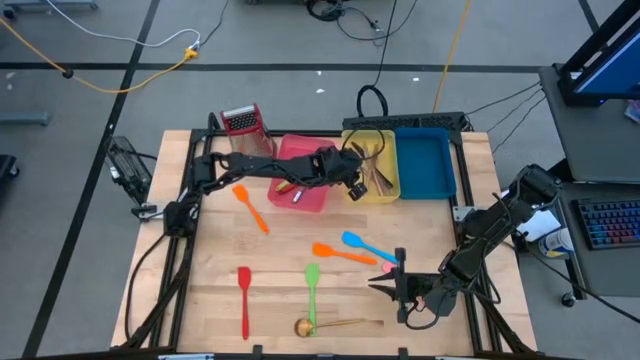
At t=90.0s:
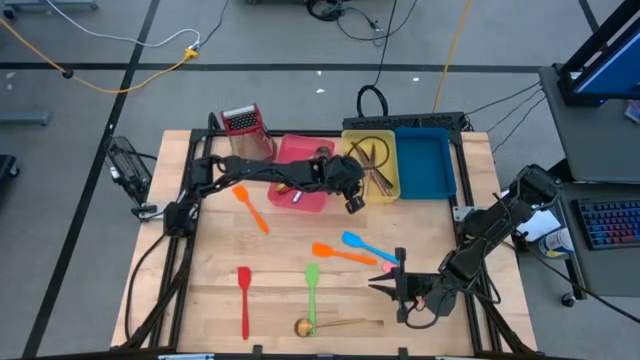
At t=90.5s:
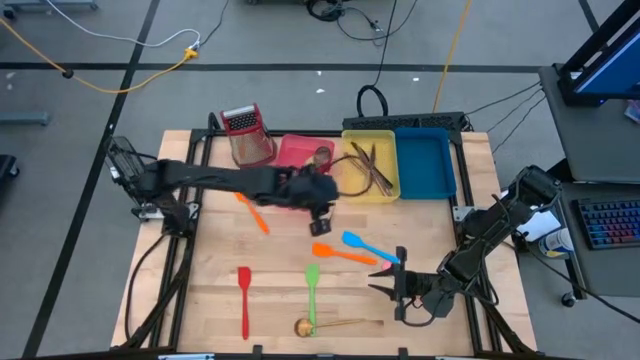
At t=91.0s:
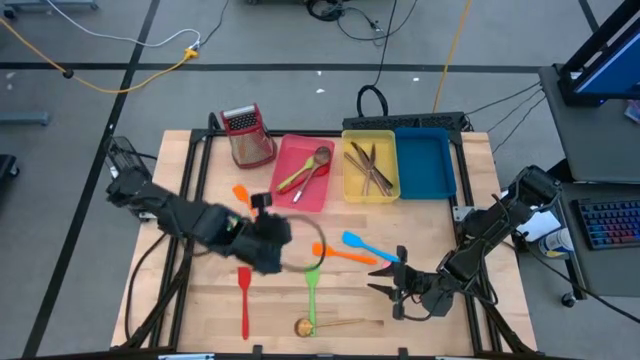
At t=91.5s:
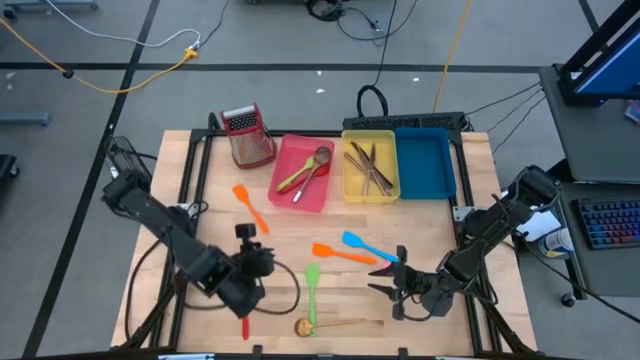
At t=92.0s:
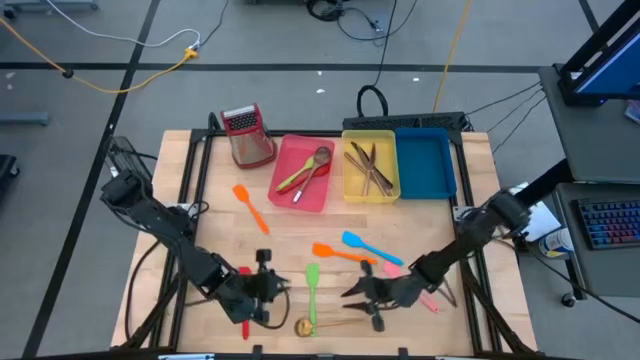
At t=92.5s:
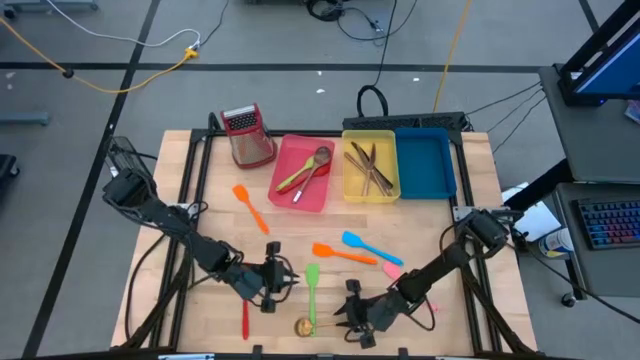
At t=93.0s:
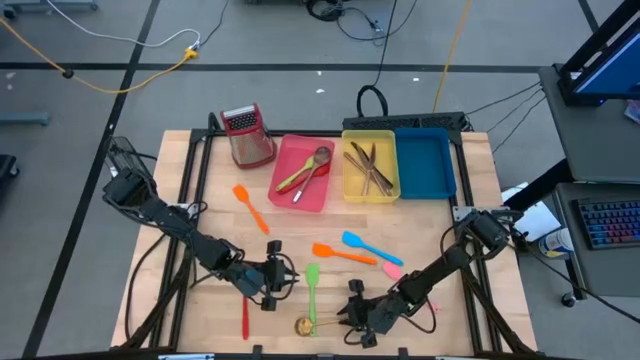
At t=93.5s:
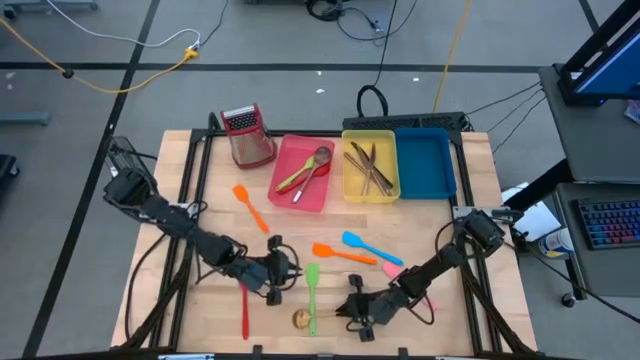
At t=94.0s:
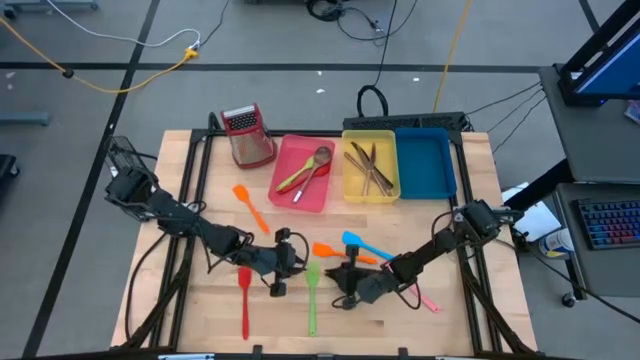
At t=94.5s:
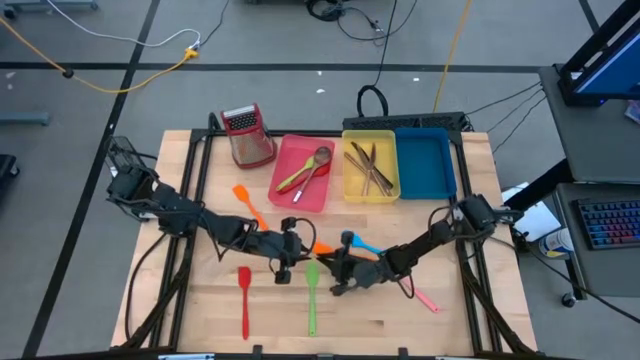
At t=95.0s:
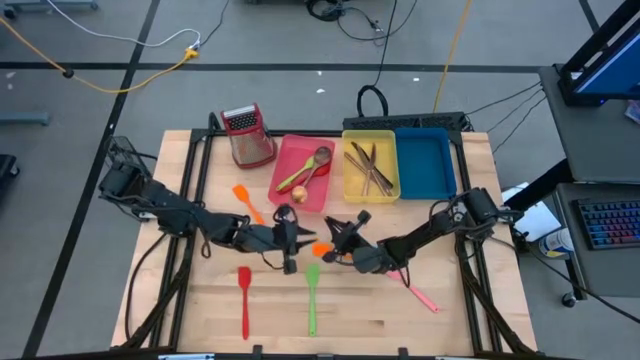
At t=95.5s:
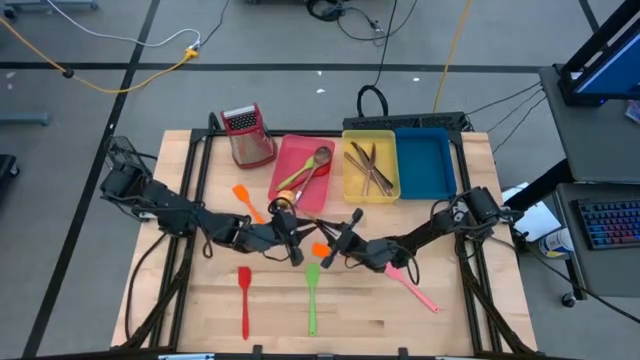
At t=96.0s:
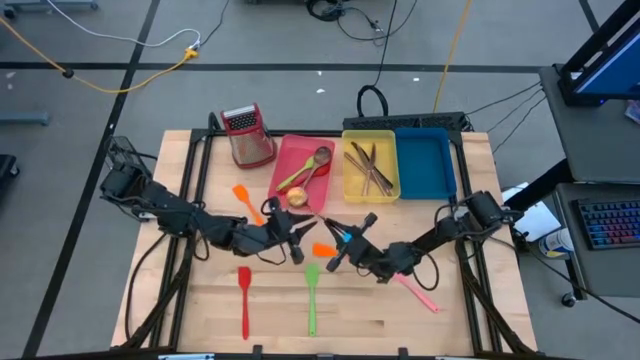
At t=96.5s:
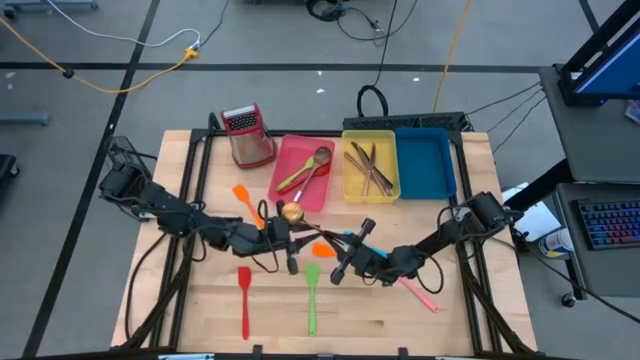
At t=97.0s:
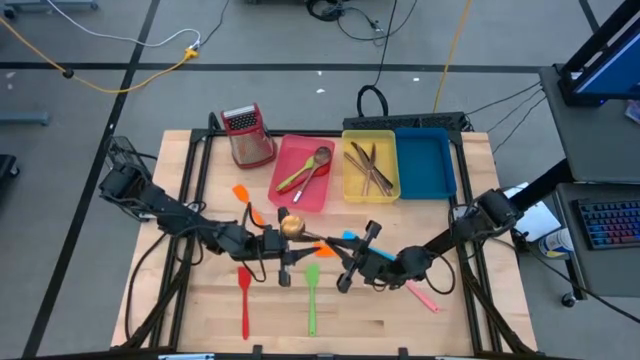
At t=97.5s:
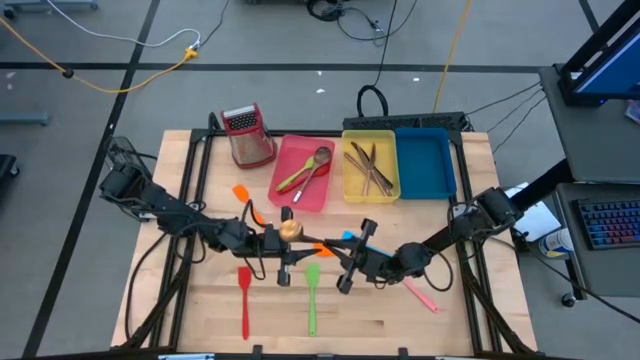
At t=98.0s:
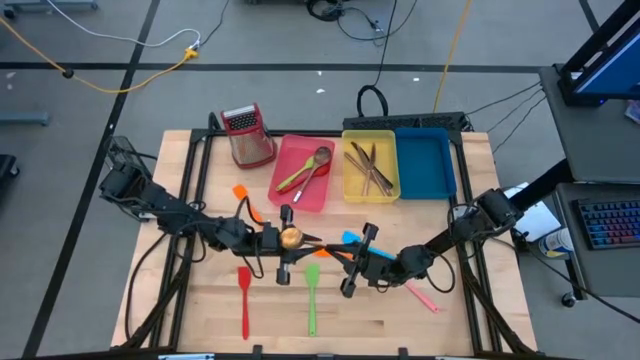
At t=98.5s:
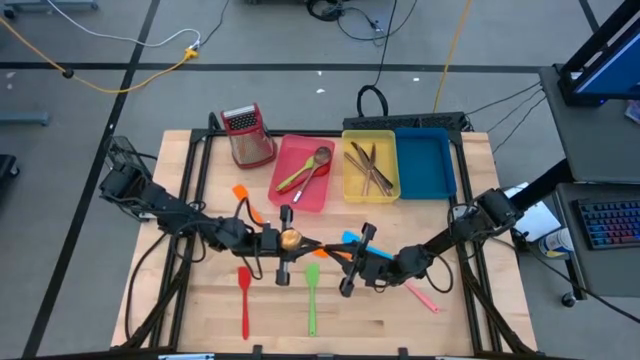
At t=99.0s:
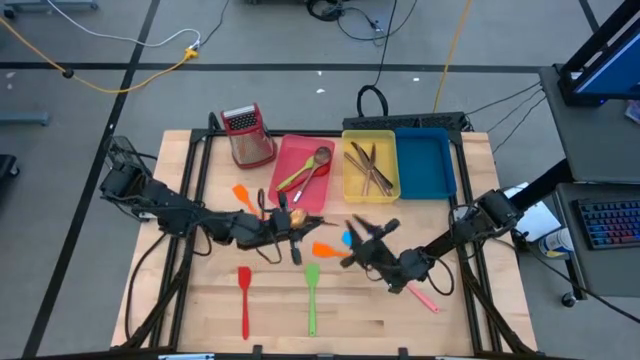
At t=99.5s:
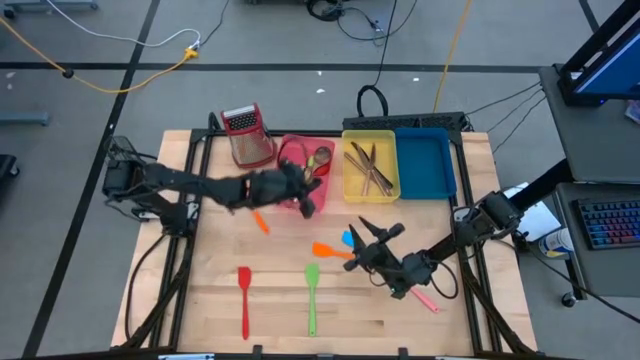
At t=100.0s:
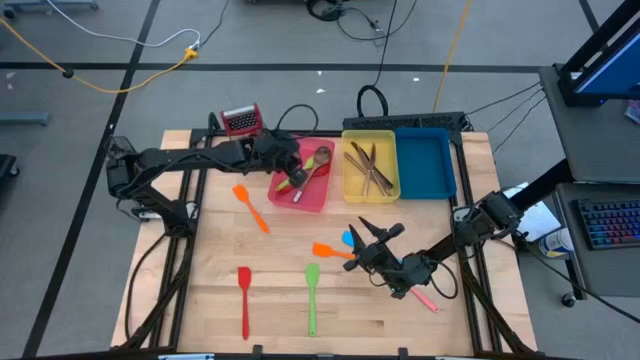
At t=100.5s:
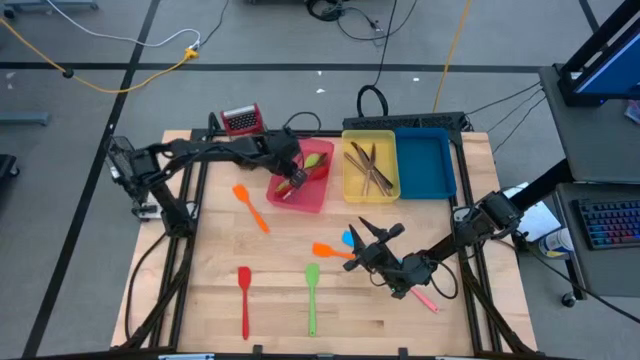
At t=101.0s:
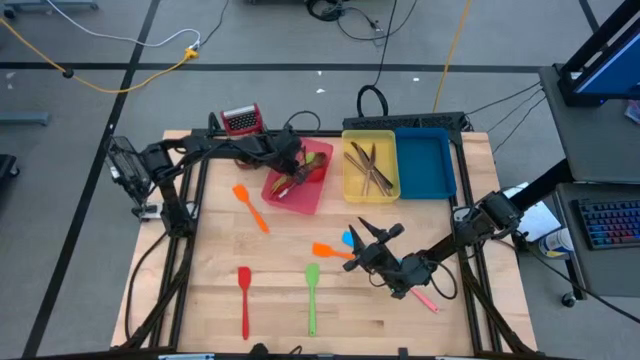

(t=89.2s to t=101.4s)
Task: Pick & Place Kitchen Items
Put the gold serving spoon into the red bin

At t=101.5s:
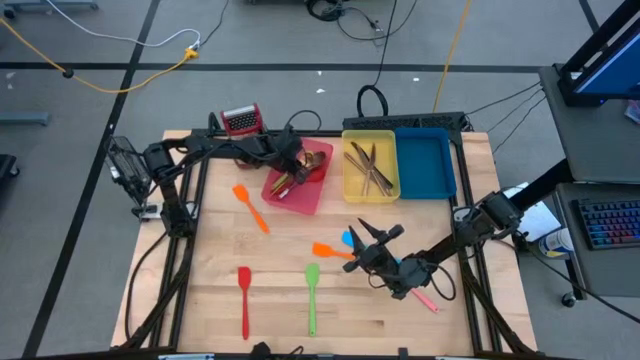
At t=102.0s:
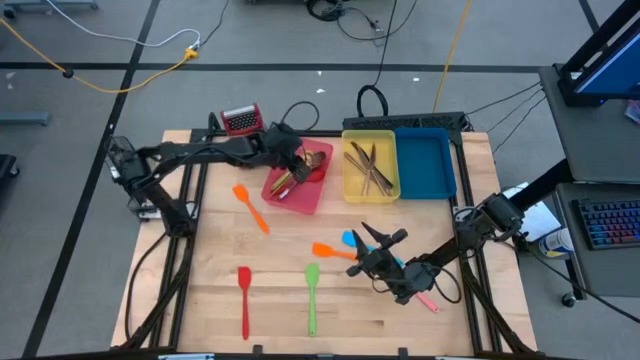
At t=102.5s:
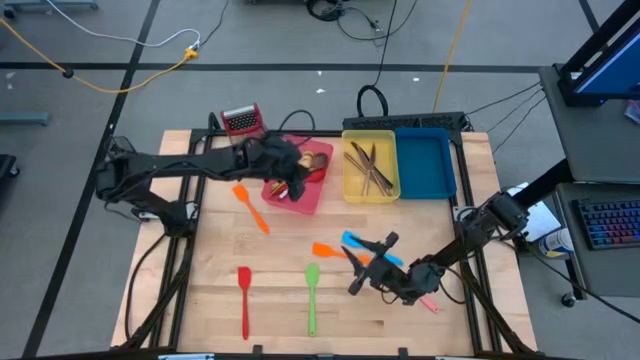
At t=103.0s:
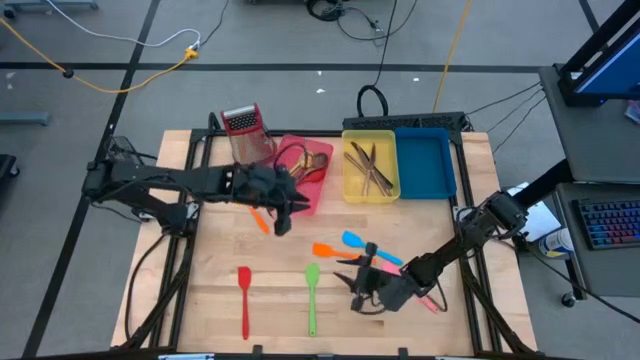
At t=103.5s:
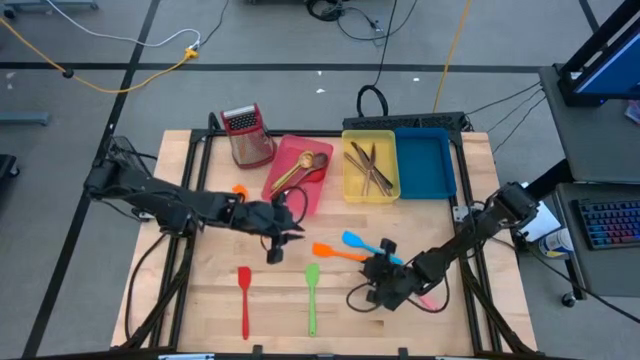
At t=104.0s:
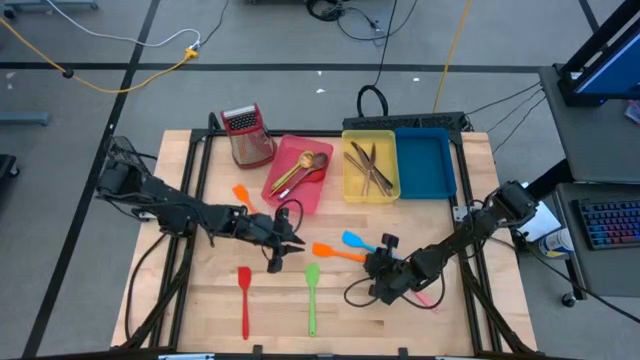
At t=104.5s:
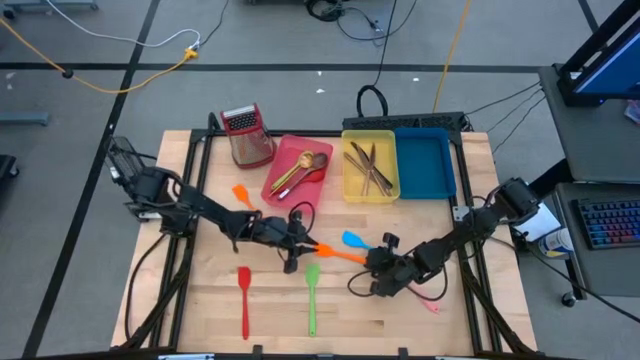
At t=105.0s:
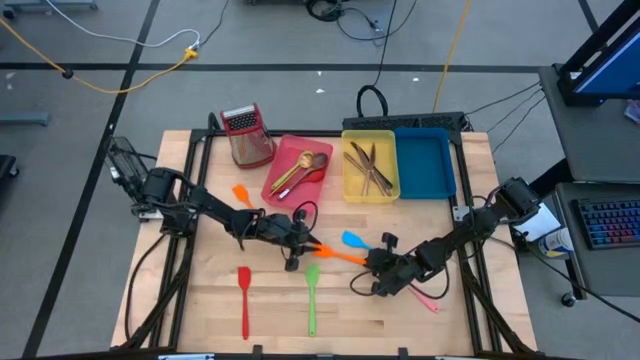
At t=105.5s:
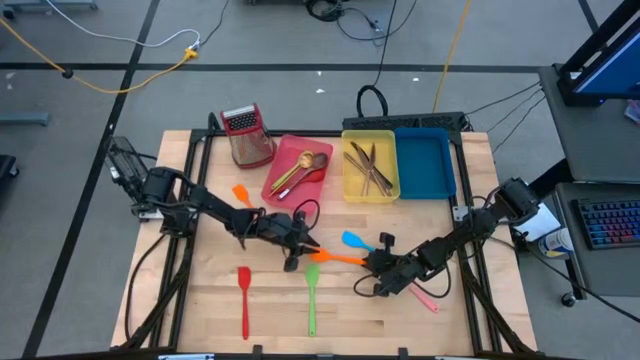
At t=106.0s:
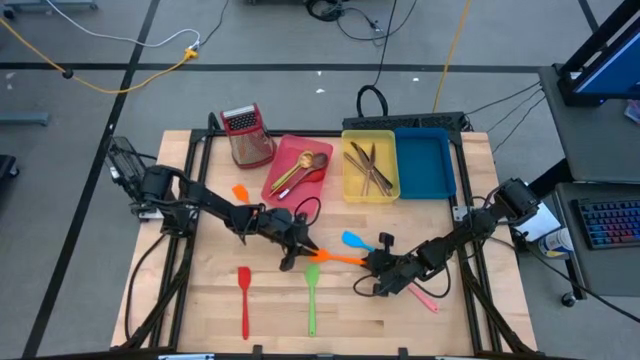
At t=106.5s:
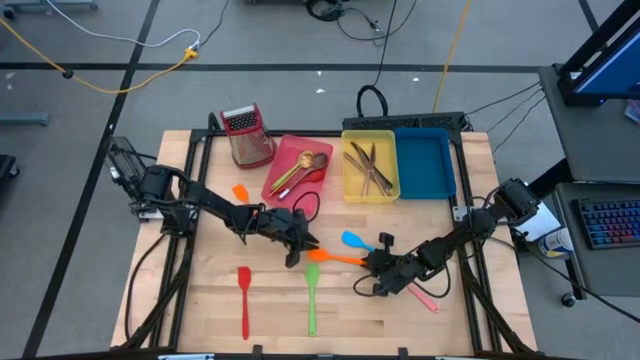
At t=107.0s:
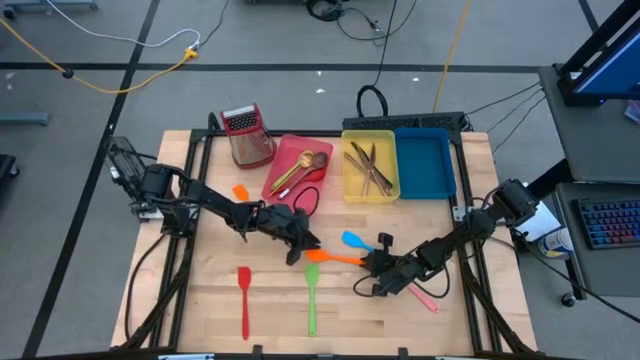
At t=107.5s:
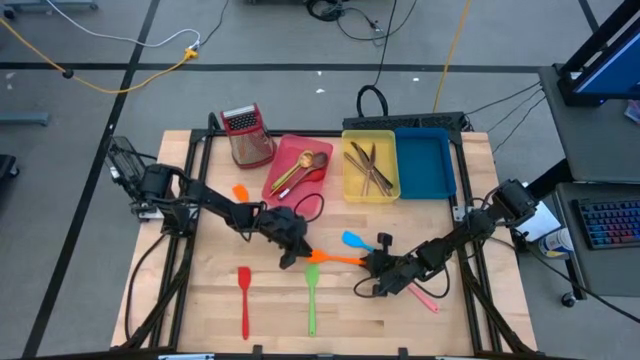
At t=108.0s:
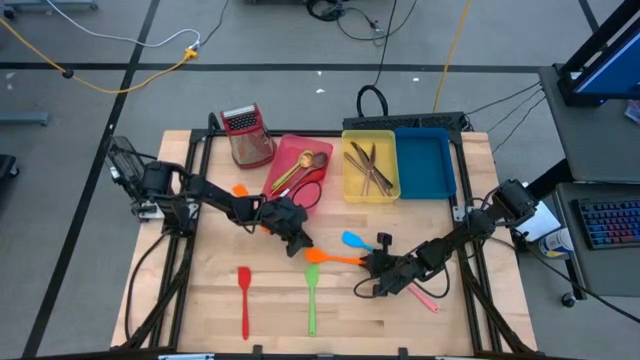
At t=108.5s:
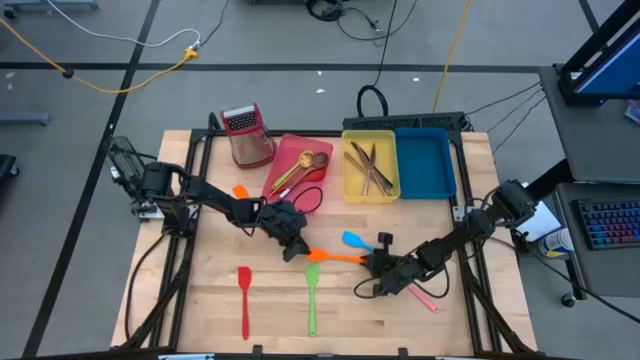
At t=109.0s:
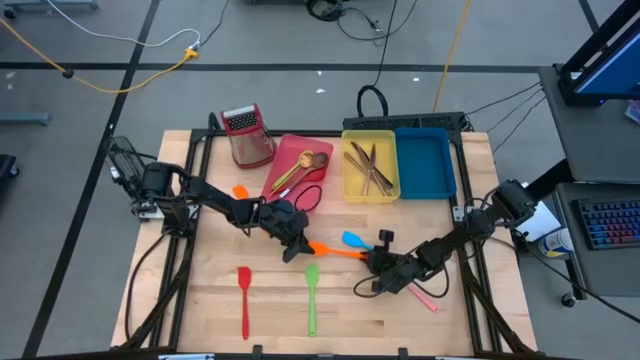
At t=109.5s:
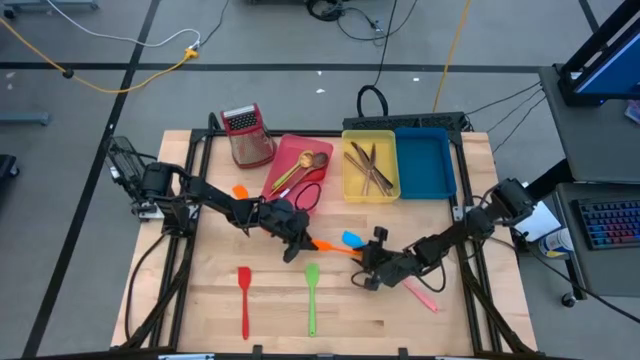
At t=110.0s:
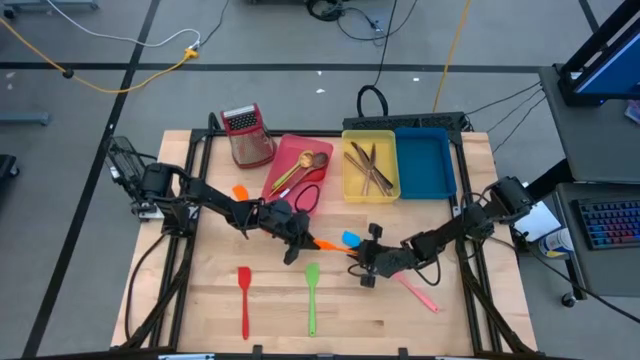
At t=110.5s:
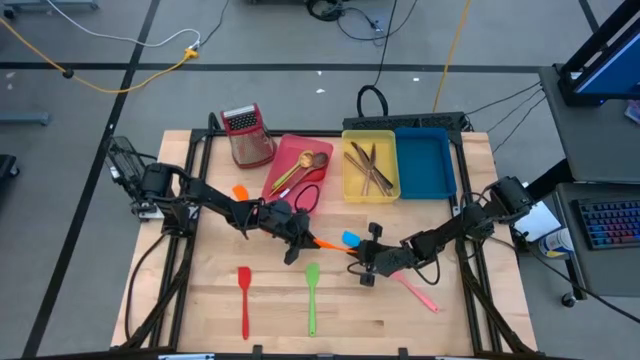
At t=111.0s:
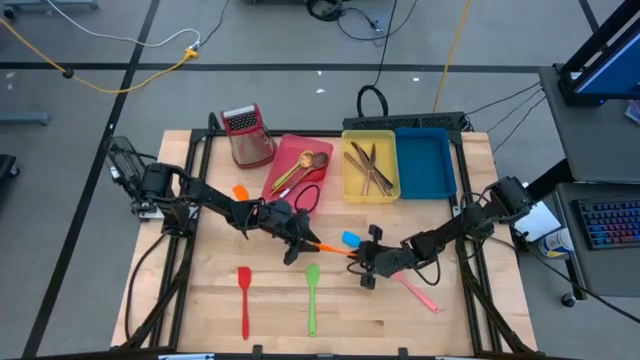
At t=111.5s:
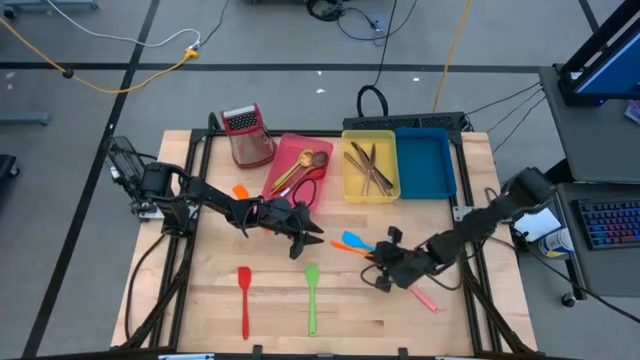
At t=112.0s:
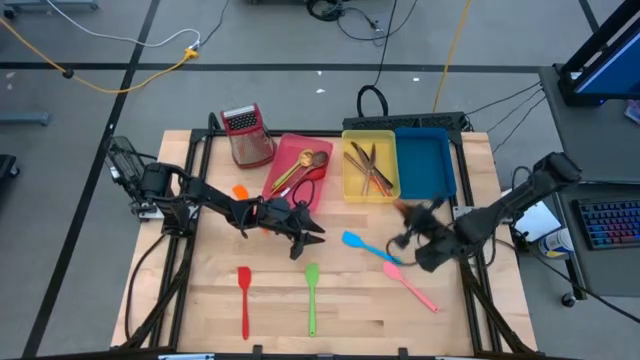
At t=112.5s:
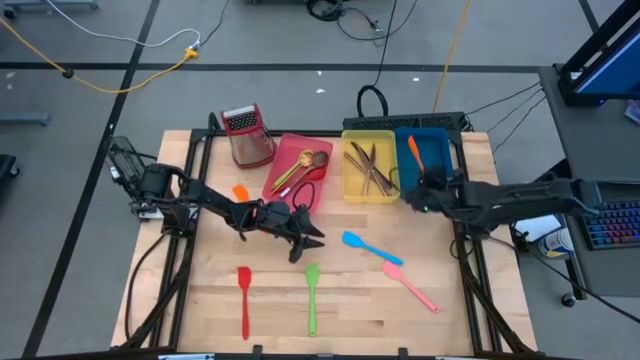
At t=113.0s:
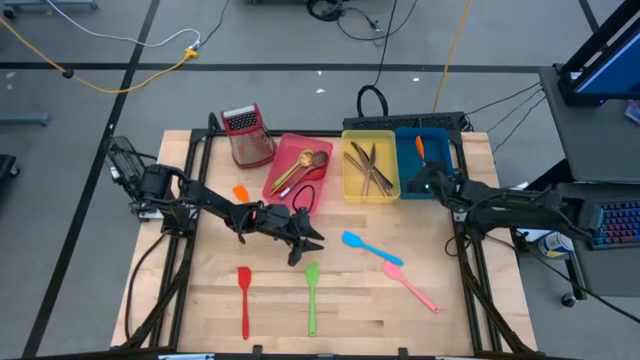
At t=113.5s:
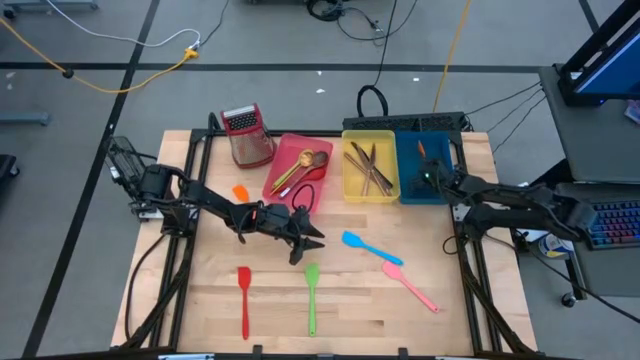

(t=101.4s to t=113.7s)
Put the bottom orange serving spoon into the blue bin
